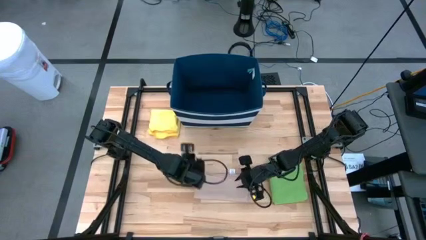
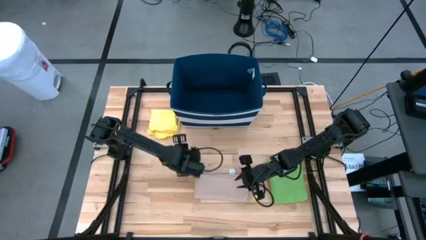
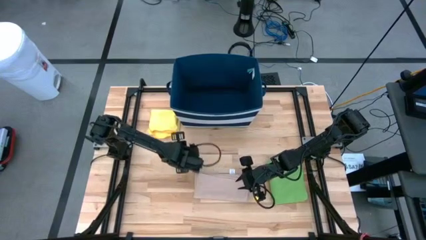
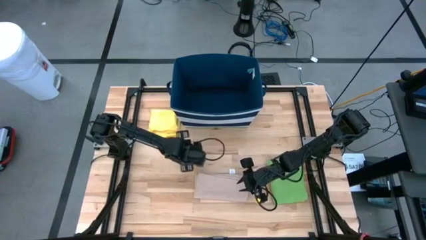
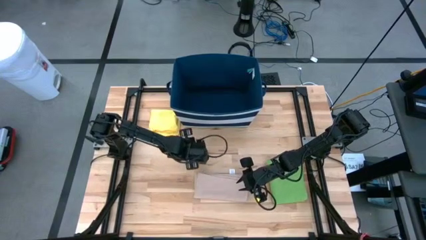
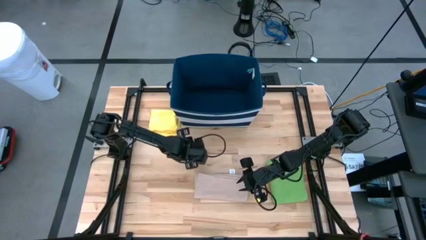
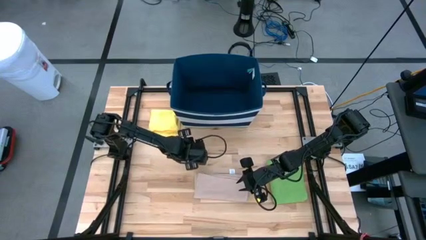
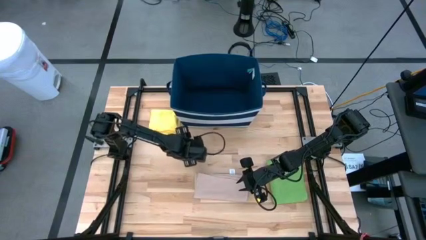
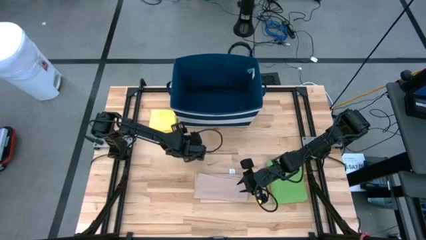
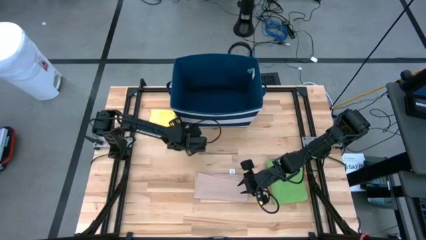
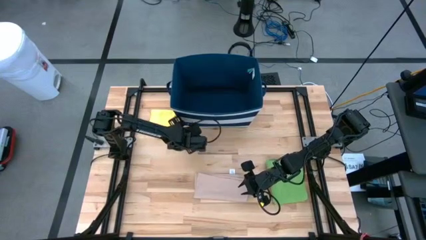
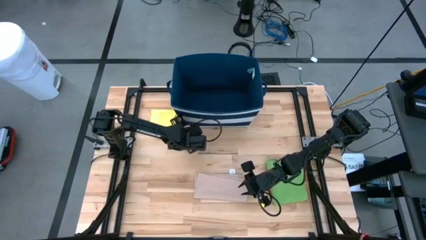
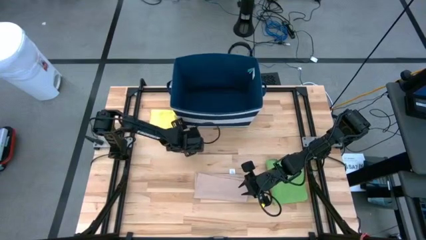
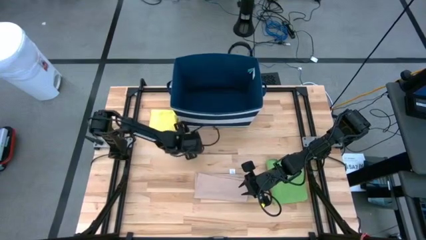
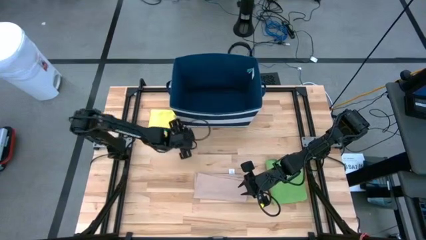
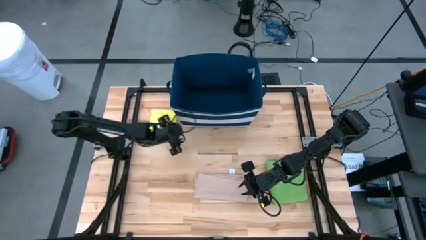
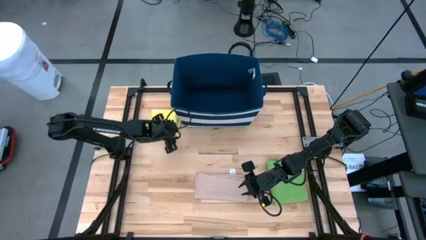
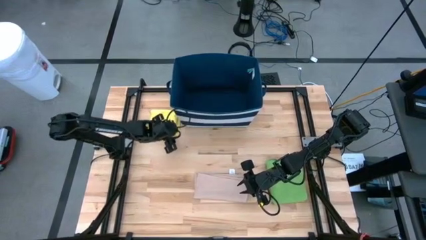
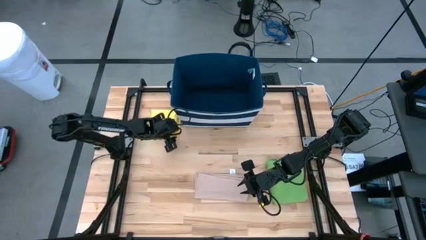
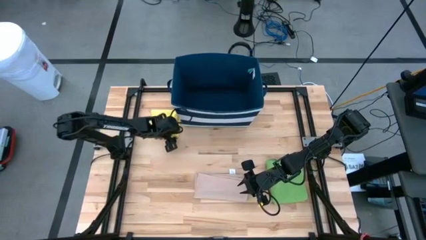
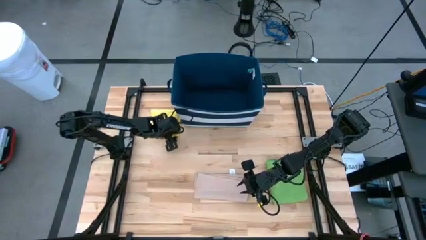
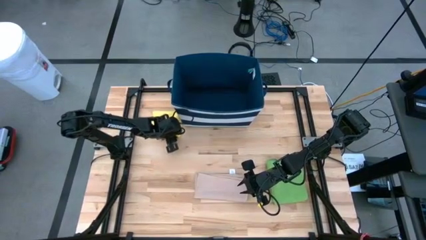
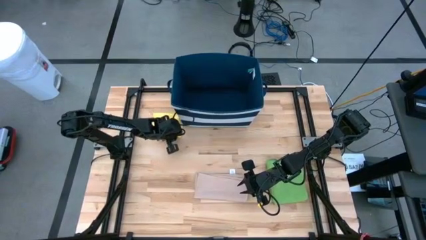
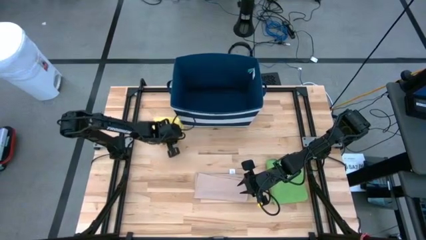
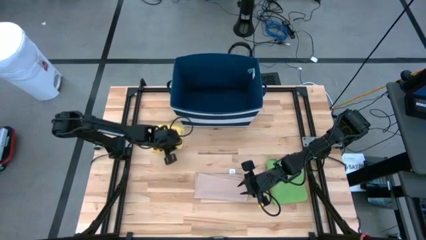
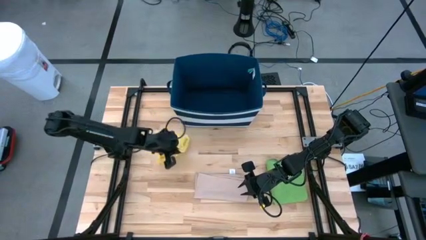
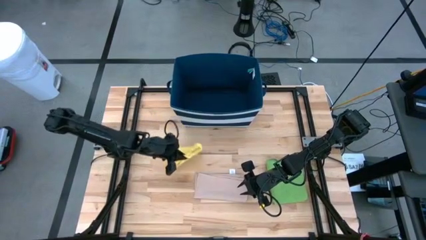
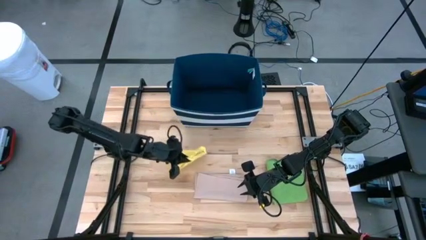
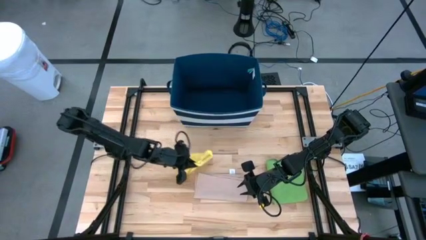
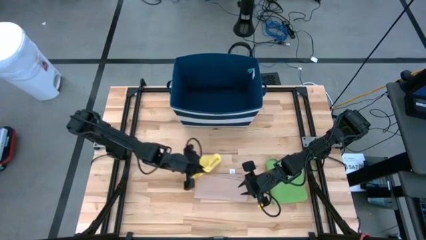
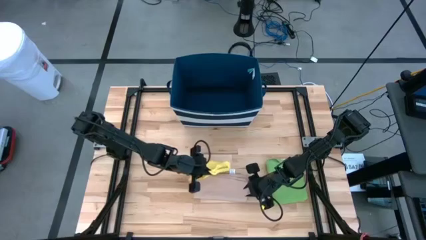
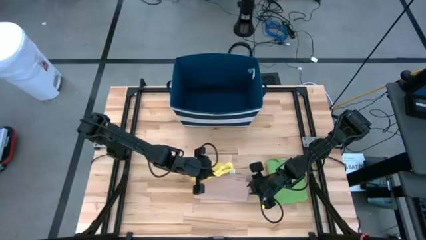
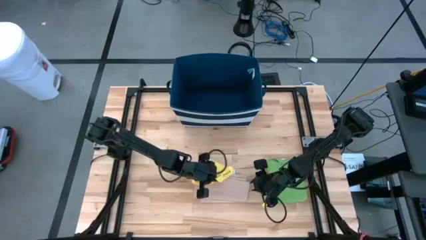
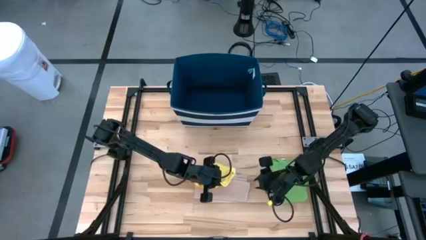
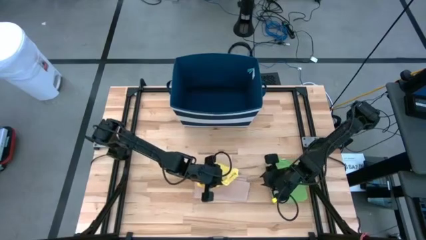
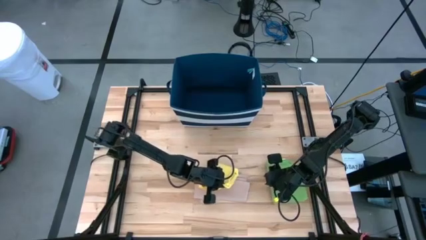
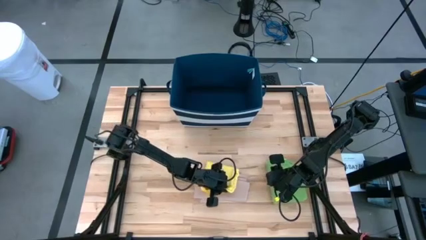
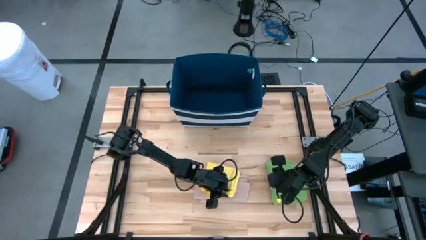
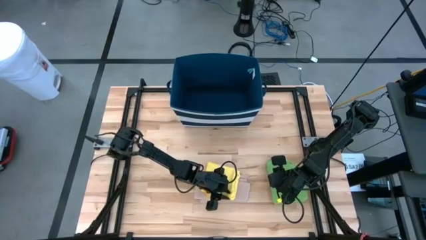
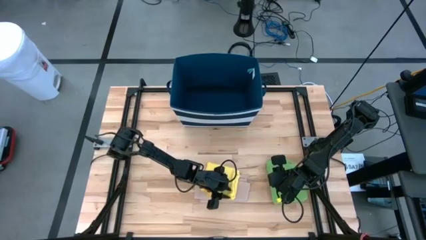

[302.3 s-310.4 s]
Task: Fold towel
Stack the yellow towel on top of the light pink towel

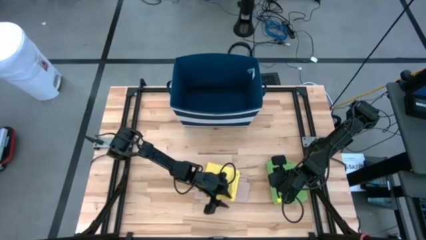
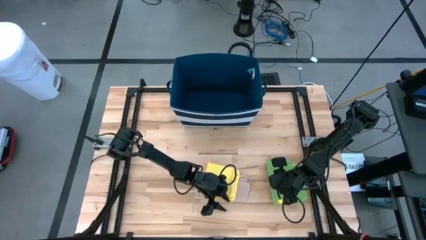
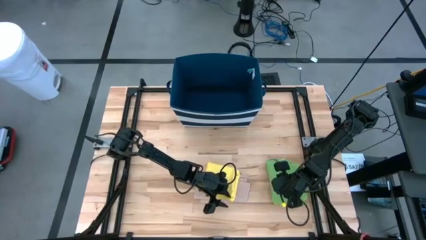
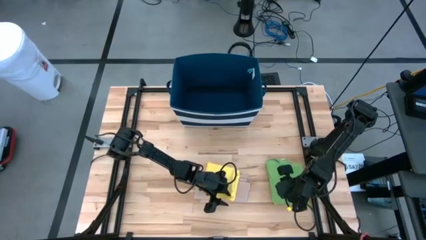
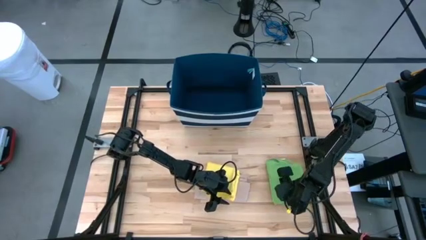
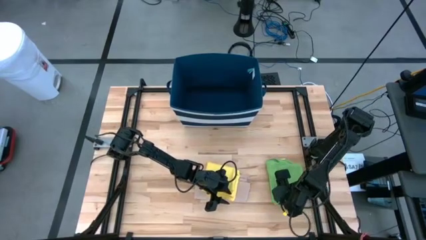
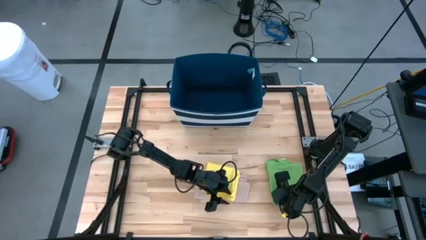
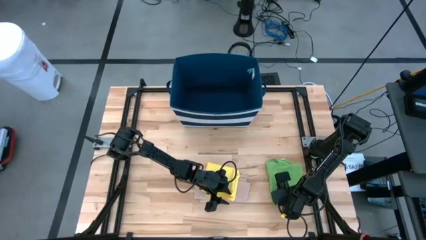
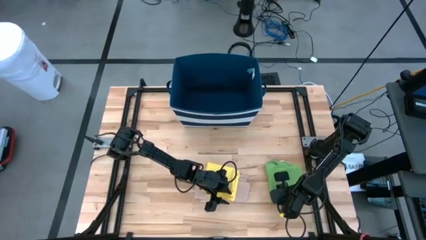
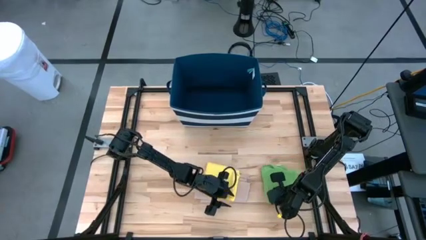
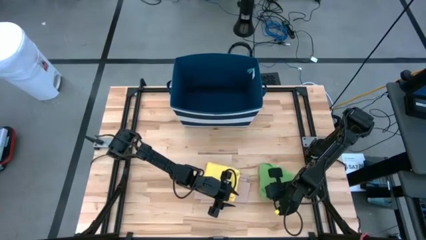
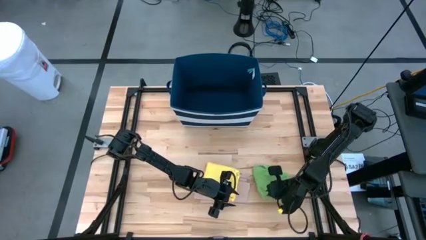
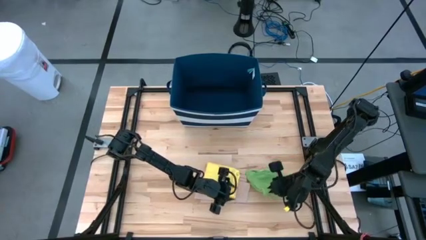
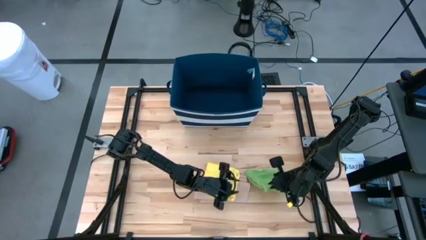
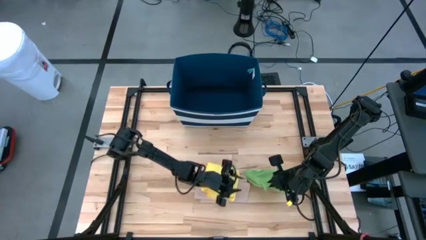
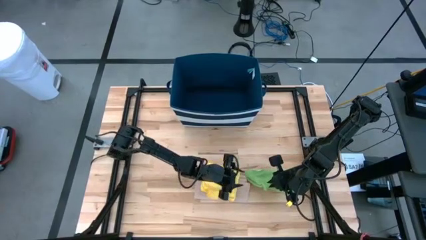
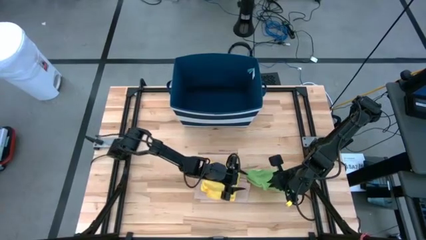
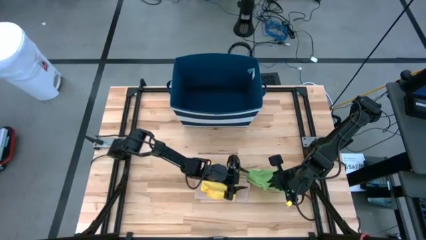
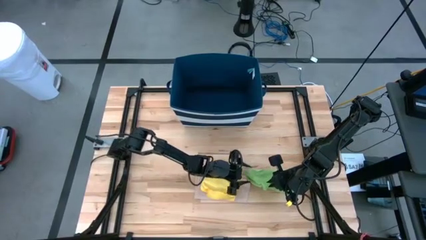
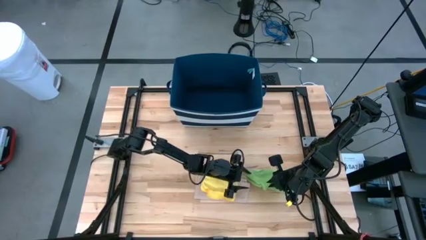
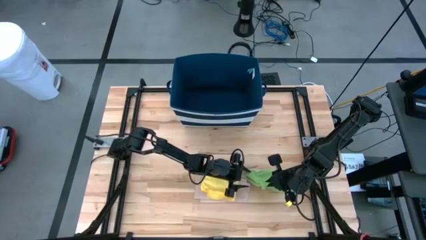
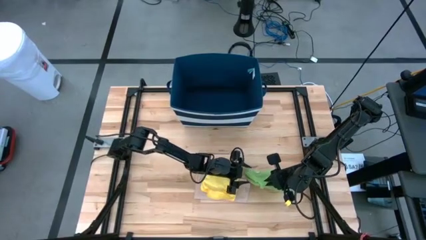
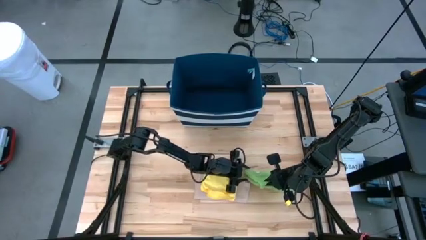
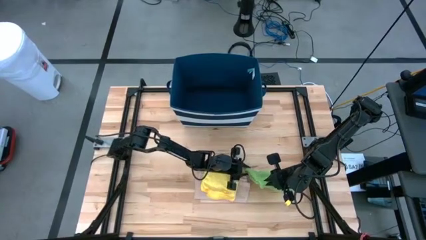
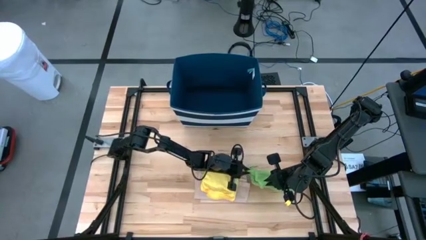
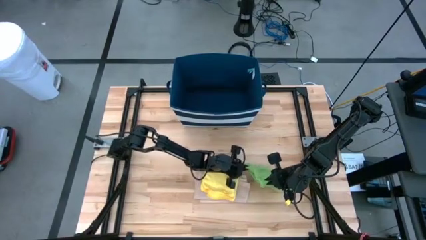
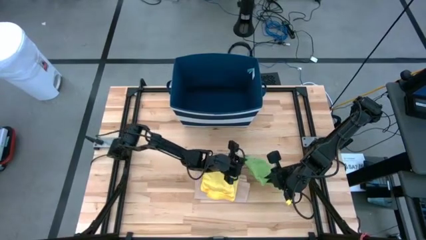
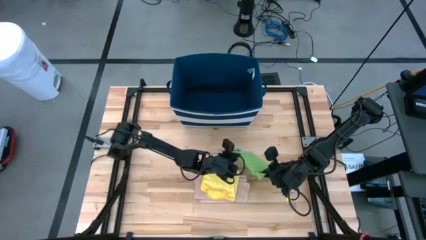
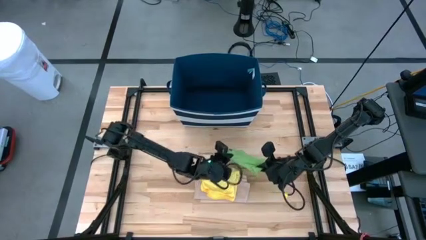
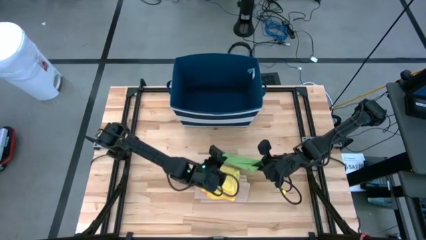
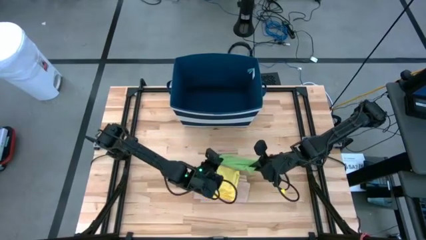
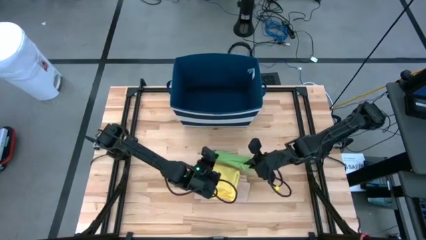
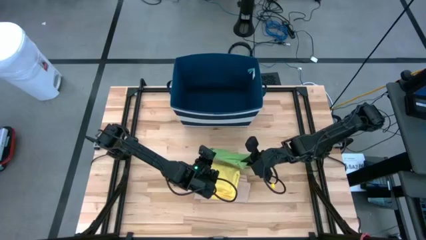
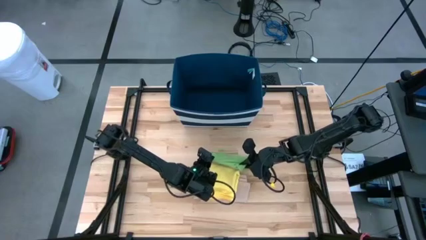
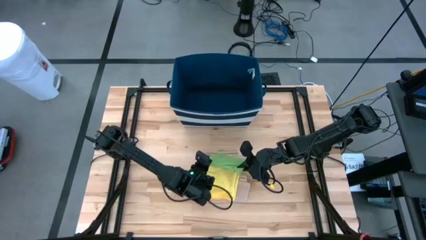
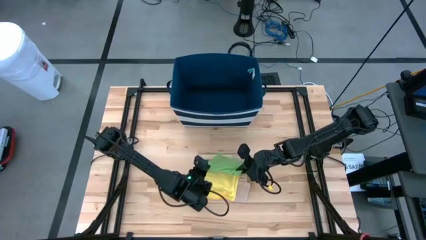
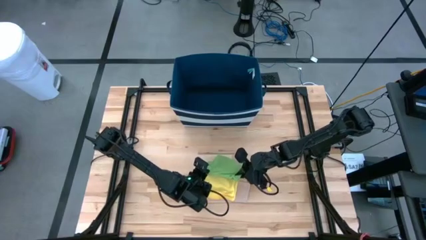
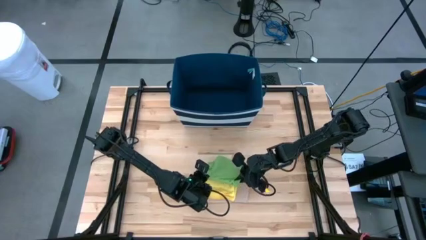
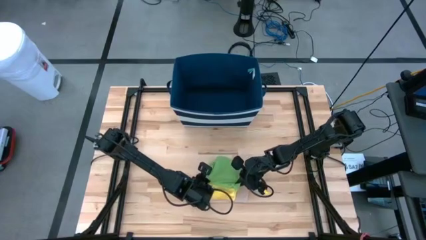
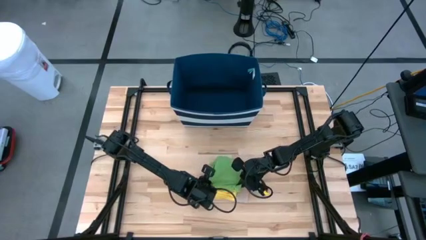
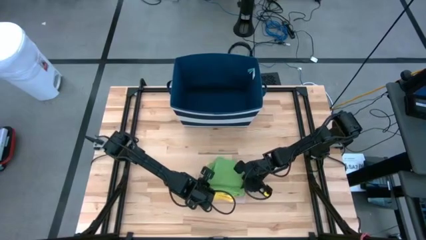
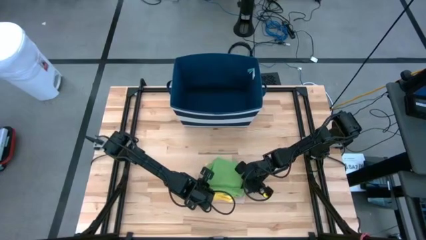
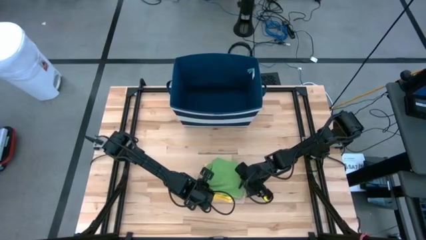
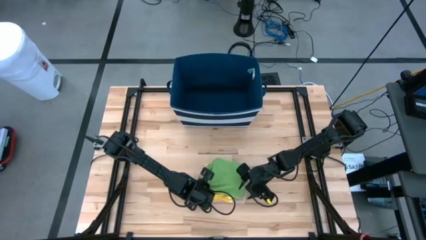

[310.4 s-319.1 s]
Stack the green towel on top of the yellow towel
